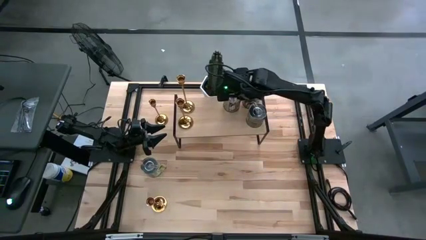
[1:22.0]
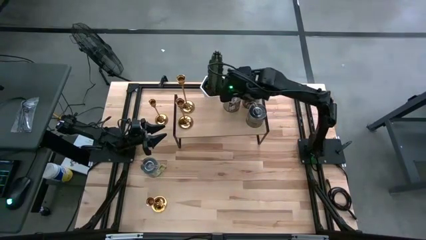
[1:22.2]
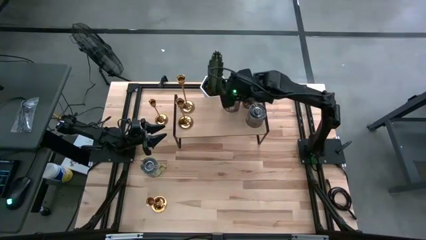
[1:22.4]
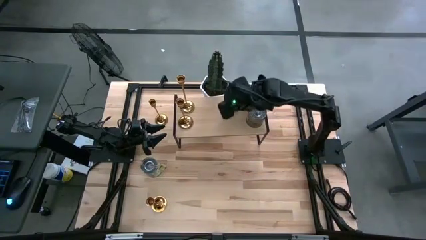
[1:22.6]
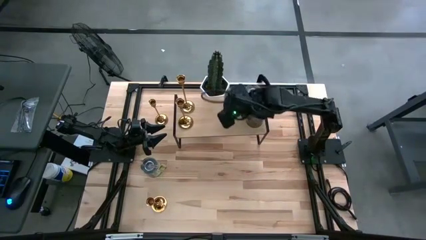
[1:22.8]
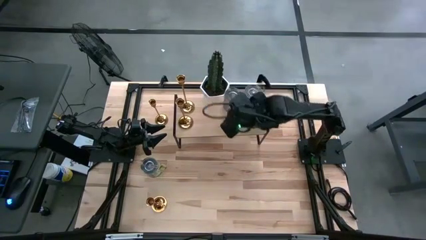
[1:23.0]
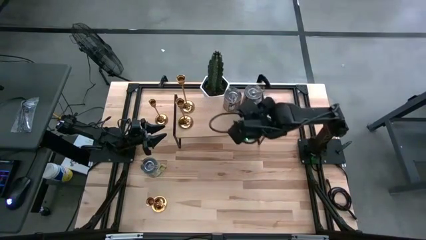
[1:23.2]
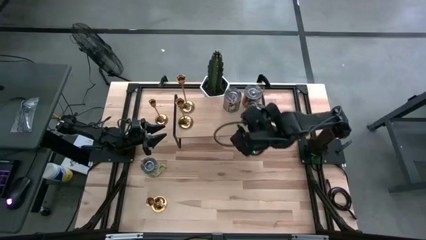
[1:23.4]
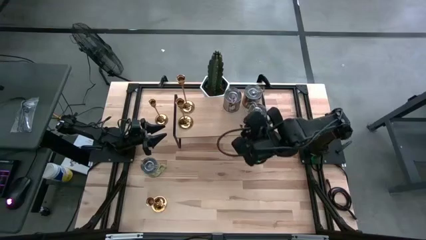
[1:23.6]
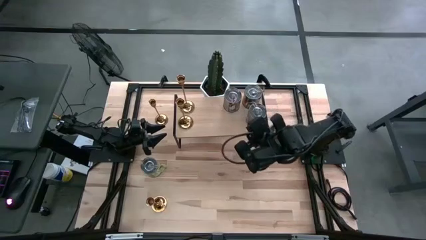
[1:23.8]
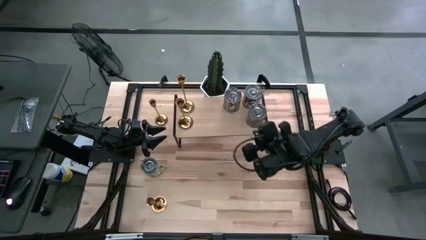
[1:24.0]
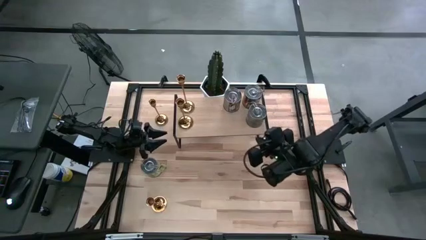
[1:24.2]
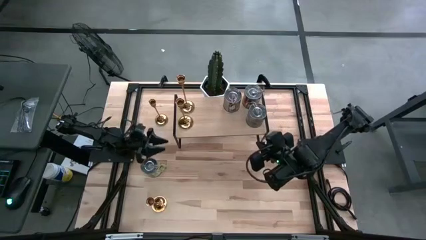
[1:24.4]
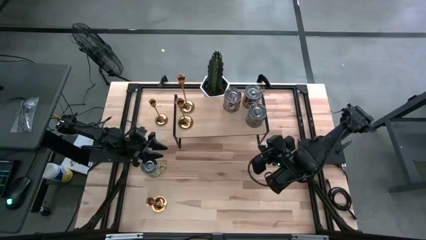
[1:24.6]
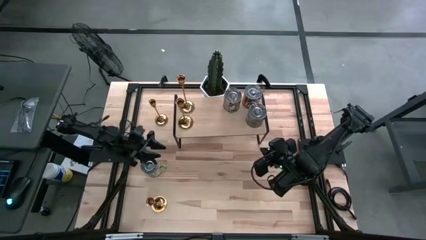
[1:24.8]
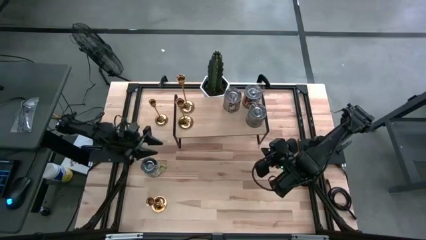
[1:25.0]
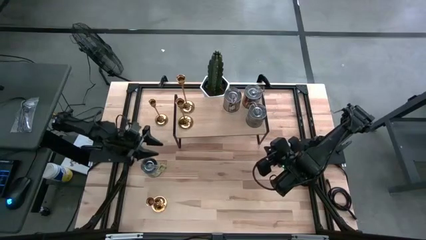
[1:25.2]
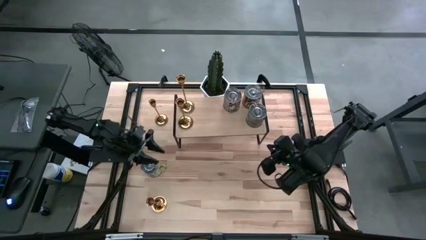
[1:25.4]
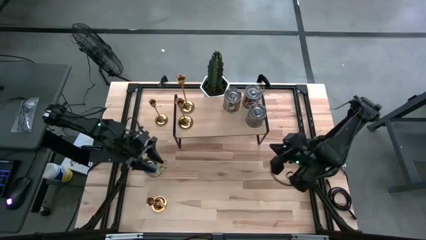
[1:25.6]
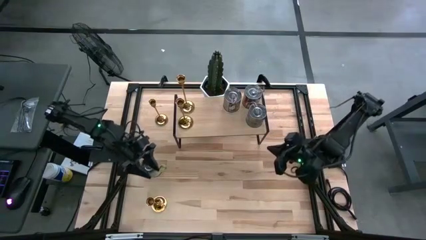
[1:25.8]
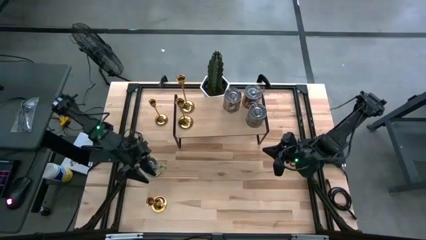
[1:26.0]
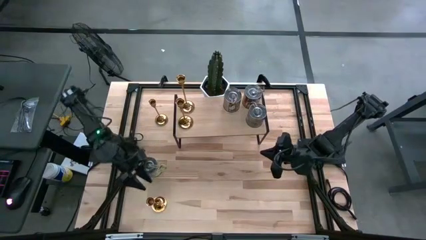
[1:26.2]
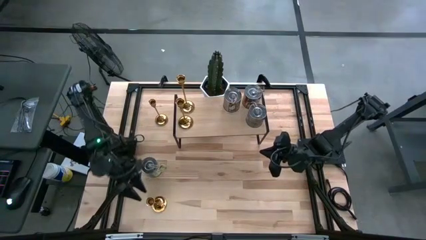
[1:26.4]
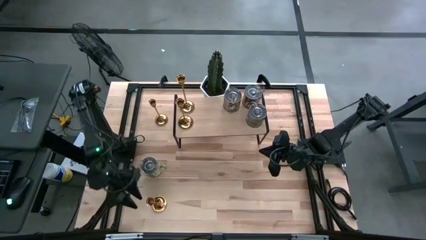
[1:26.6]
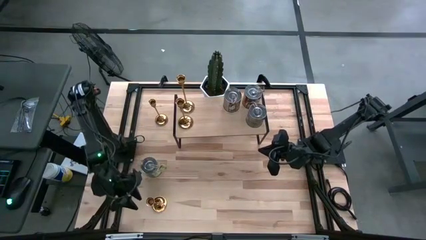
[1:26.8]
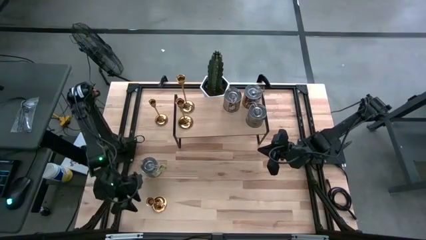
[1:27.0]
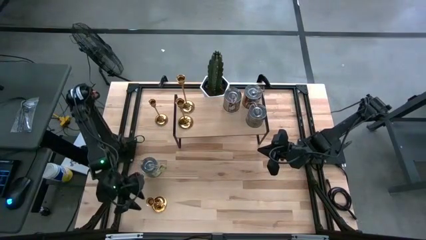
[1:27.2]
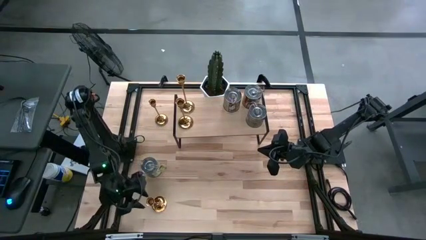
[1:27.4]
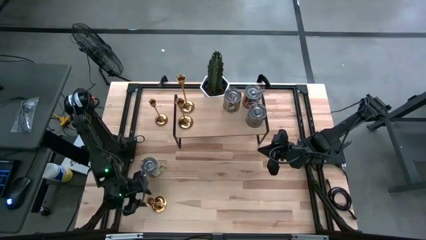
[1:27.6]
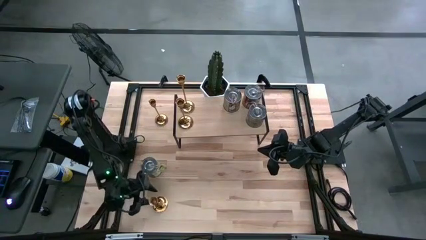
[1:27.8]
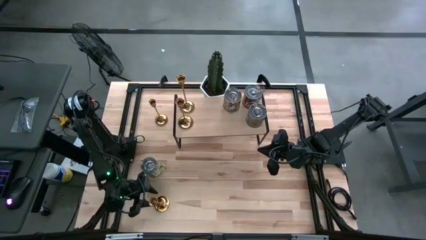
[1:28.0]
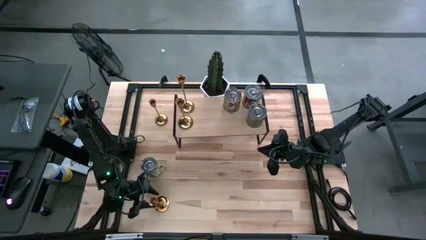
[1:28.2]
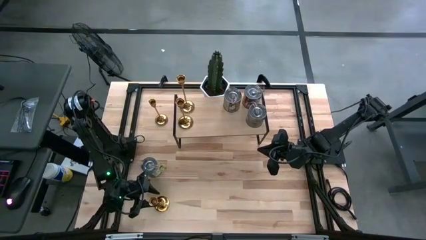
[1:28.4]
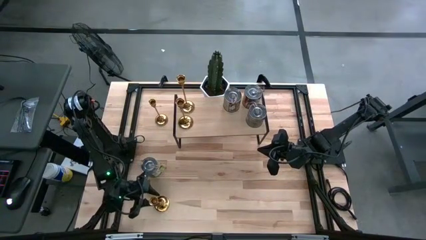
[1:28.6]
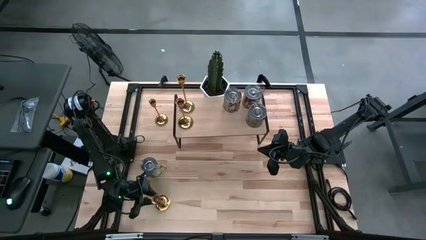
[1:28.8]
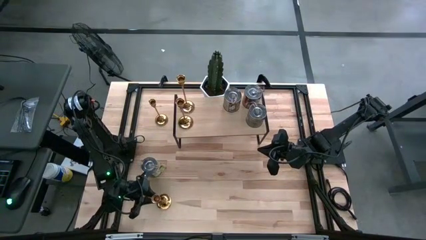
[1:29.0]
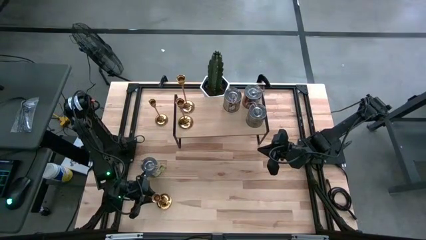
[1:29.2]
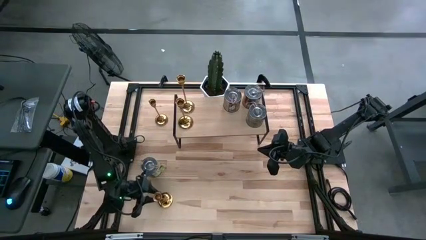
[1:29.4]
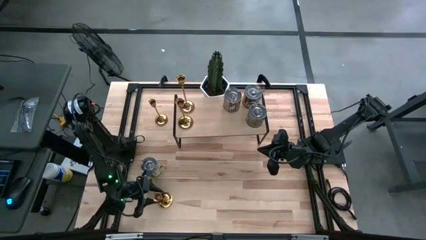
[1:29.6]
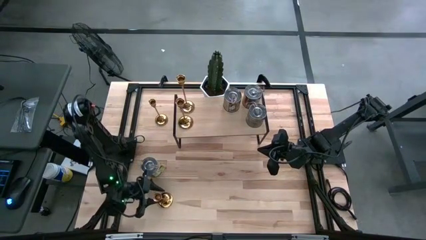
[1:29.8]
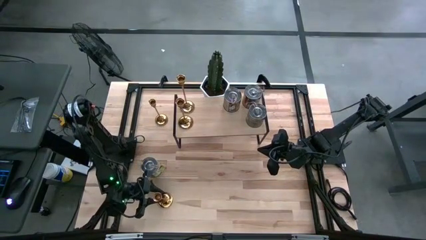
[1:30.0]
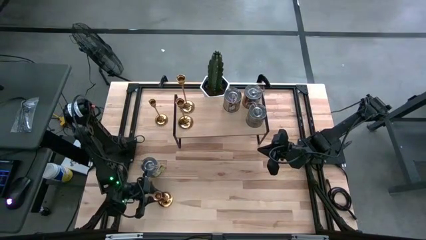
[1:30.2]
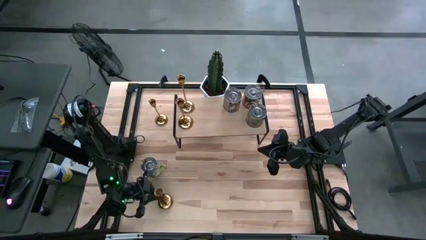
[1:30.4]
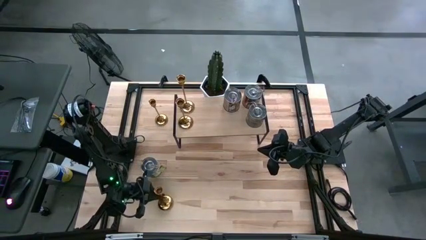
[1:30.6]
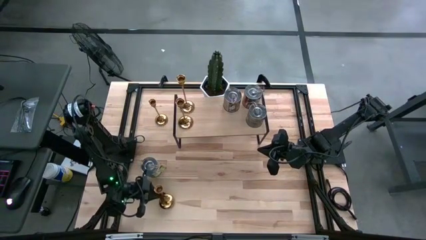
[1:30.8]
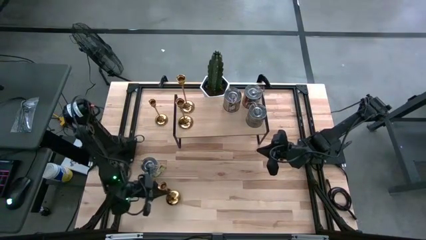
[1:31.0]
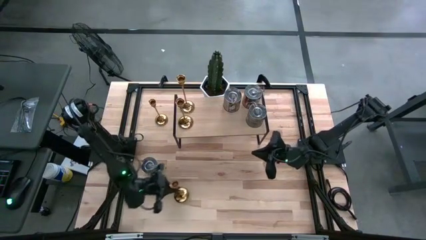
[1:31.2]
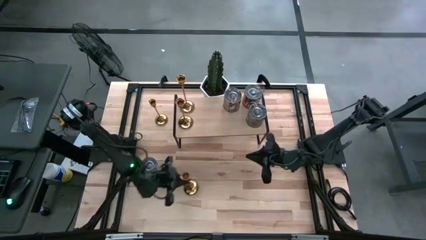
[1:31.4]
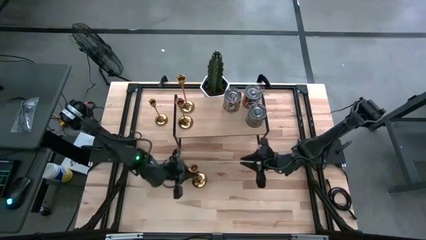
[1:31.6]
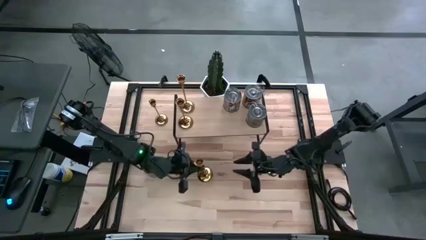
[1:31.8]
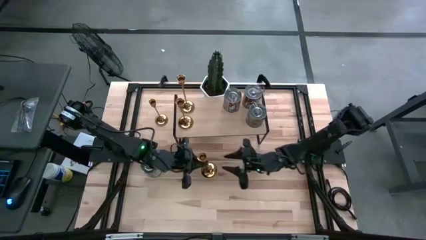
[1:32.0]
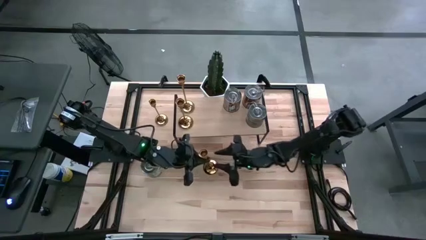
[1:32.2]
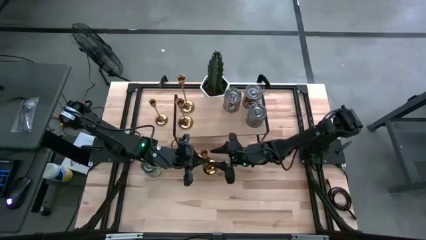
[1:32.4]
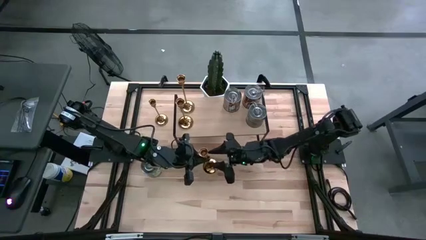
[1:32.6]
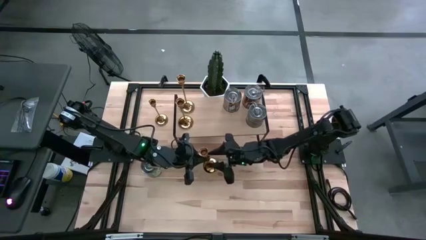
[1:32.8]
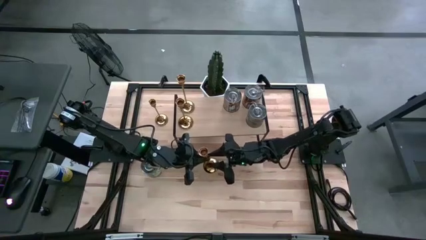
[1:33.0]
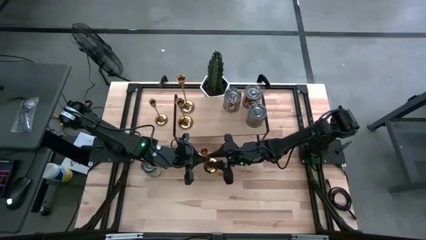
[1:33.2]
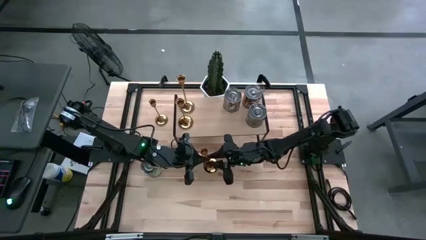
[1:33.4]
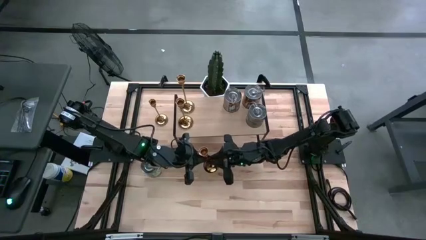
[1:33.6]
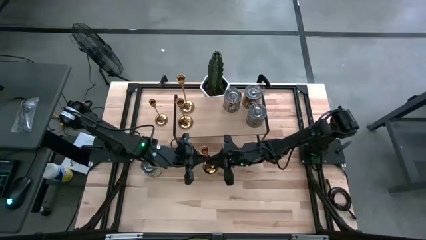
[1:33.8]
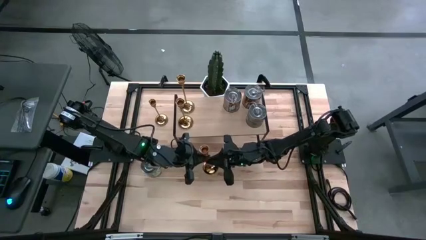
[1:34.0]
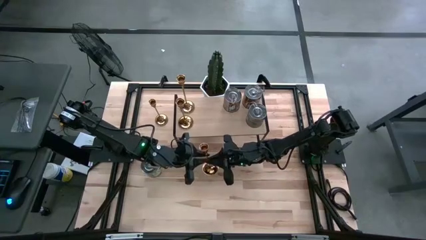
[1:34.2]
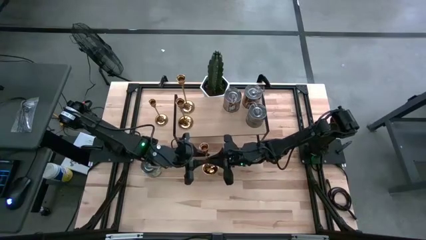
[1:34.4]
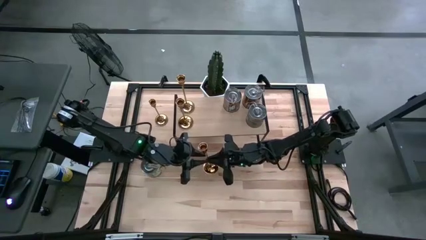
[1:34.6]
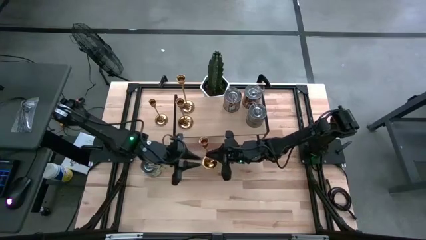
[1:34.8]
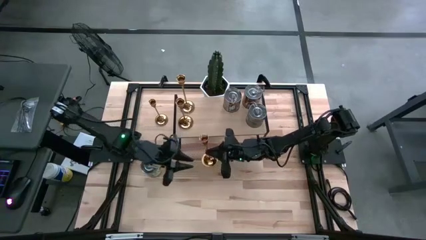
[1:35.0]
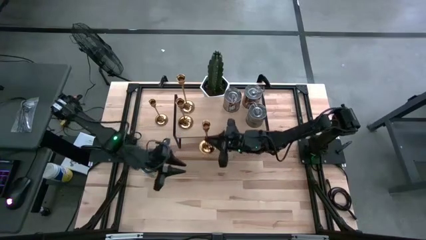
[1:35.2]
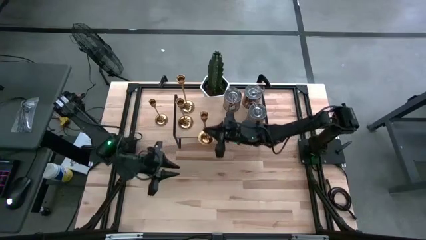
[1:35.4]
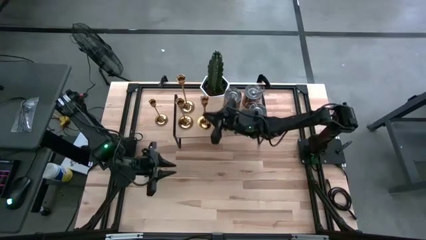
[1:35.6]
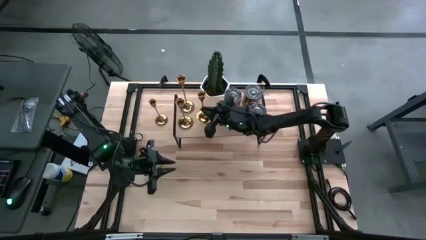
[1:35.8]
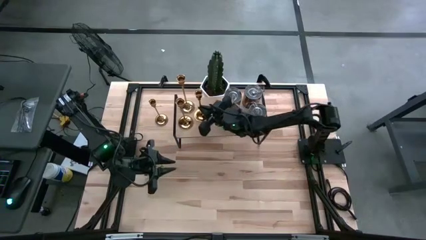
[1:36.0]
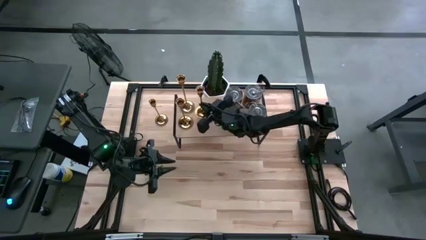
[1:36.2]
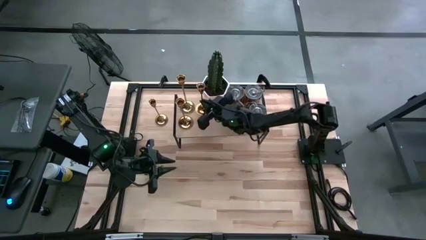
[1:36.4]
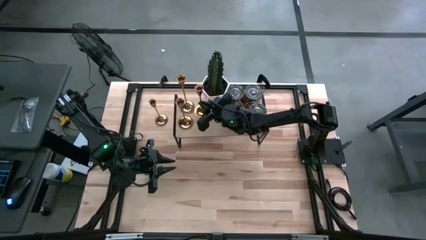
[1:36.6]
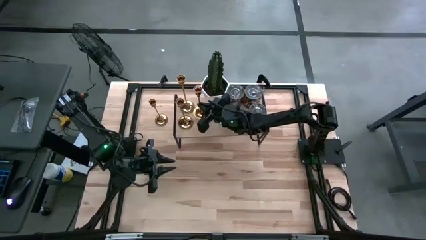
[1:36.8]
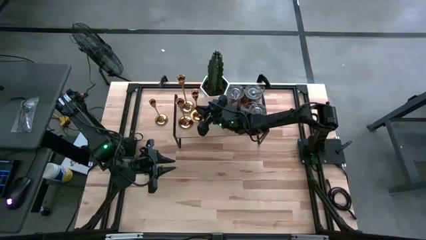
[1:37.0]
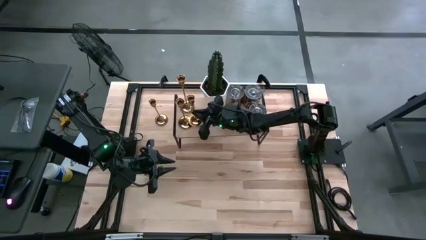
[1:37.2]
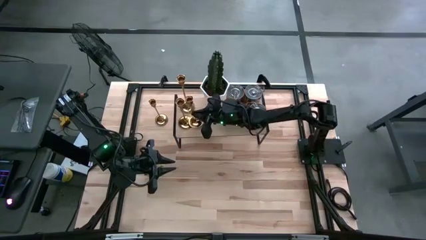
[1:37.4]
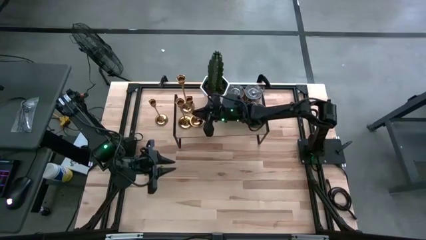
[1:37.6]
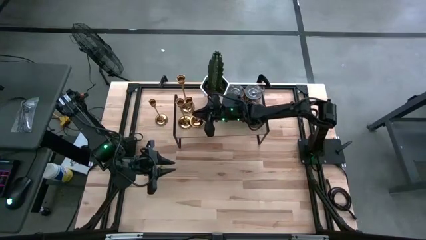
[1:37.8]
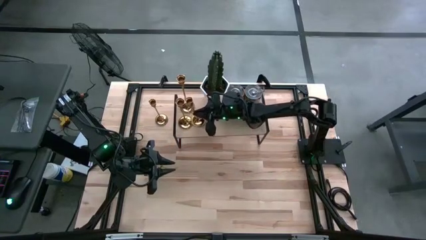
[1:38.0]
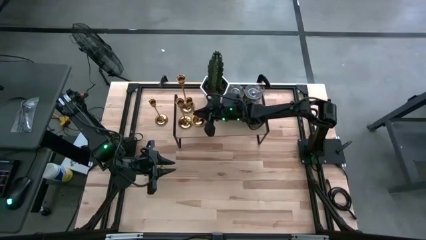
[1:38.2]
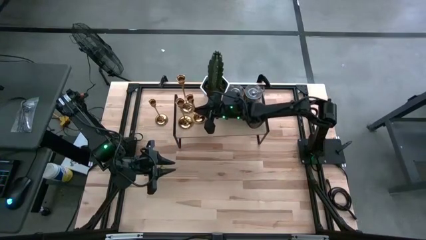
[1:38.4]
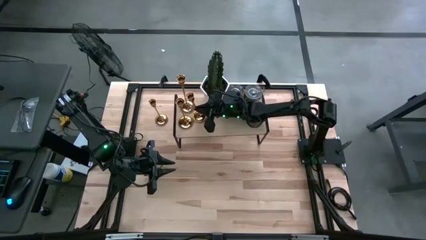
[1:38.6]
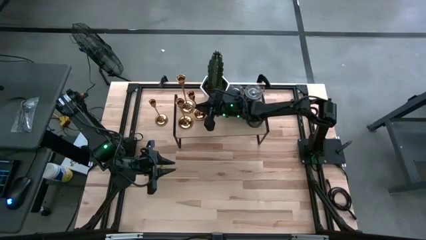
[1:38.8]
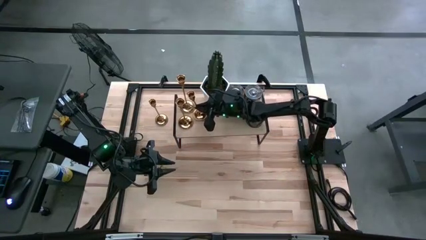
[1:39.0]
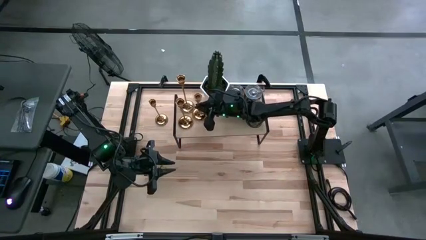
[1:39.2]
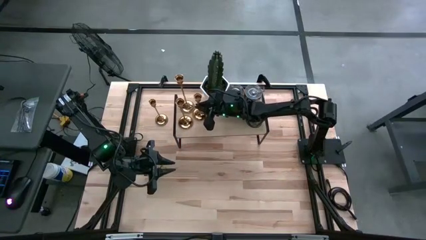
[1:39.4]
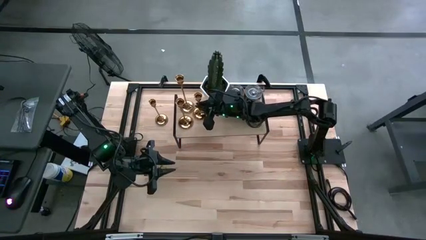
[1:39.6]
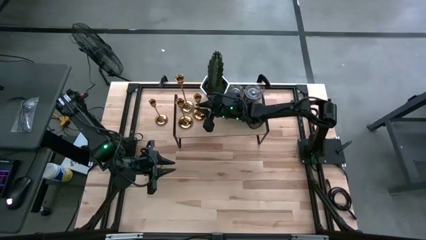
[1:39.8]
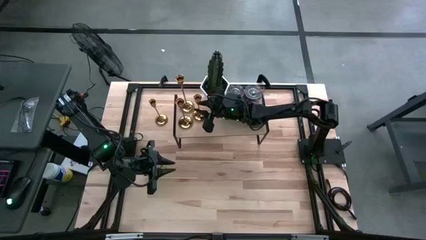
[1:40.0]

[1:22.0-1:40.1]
Task: Pick & Place candle stick holders
Put the gold candle holder on the shelf
